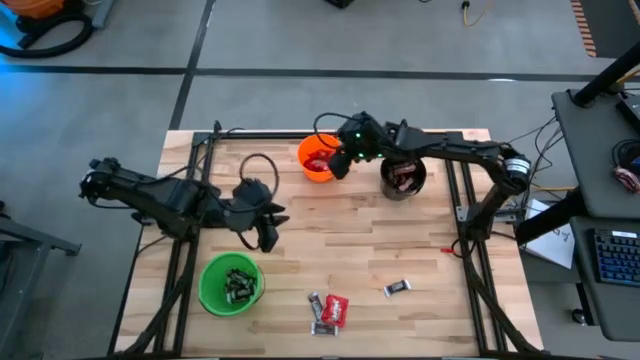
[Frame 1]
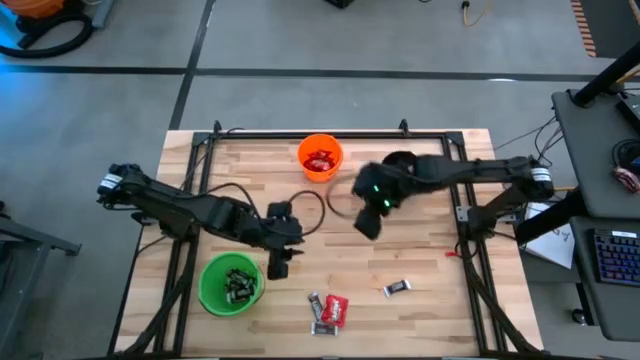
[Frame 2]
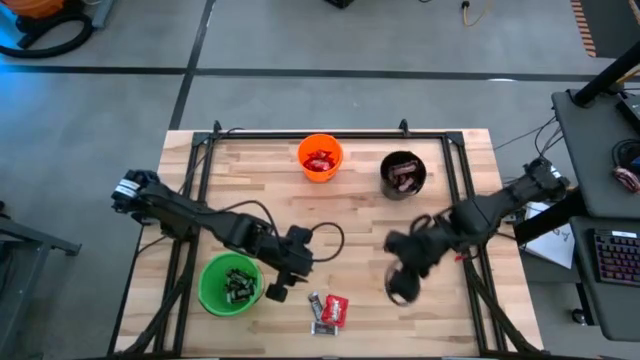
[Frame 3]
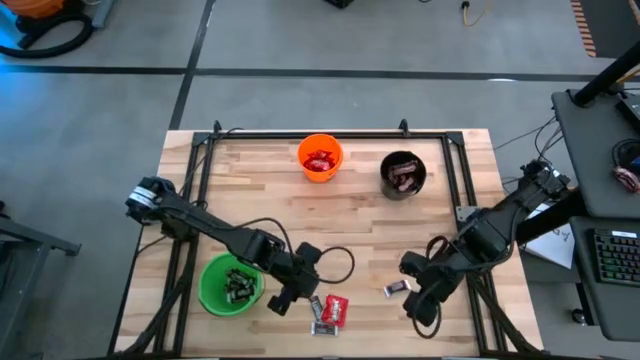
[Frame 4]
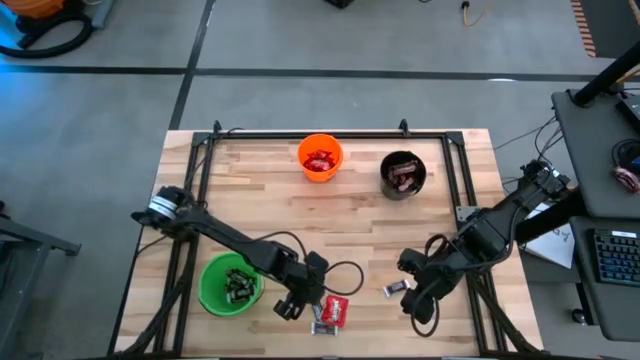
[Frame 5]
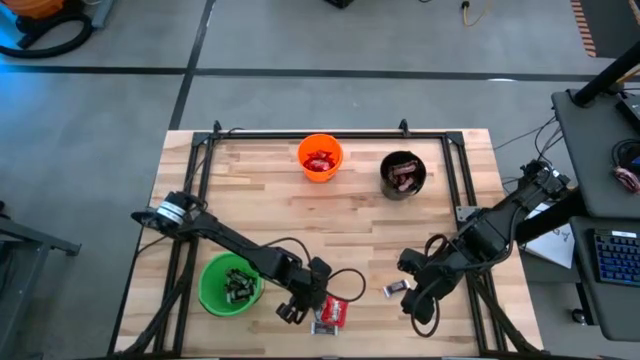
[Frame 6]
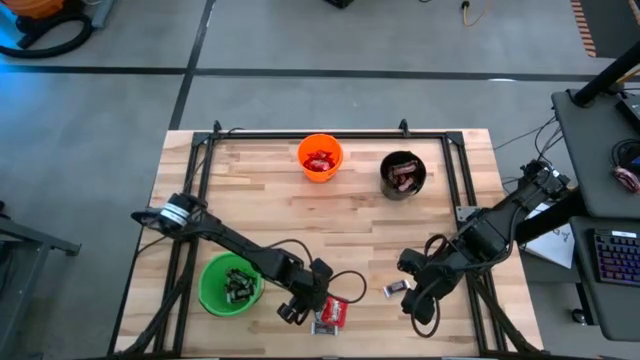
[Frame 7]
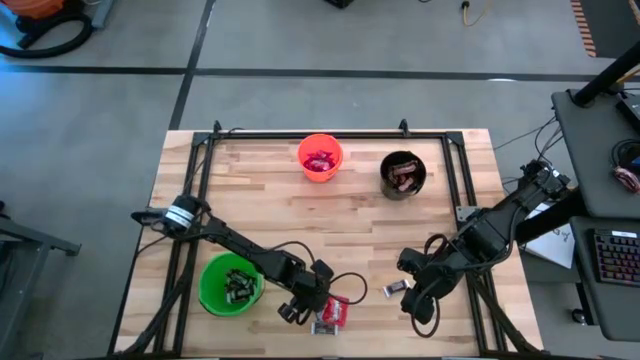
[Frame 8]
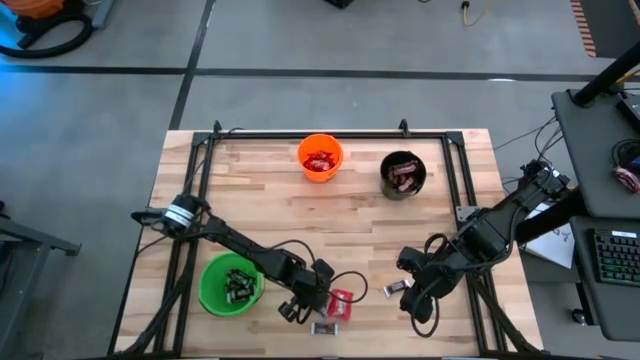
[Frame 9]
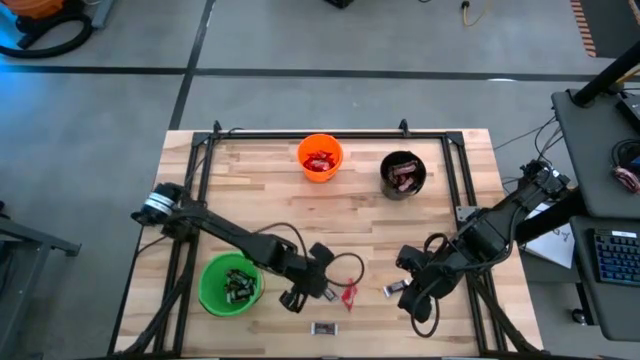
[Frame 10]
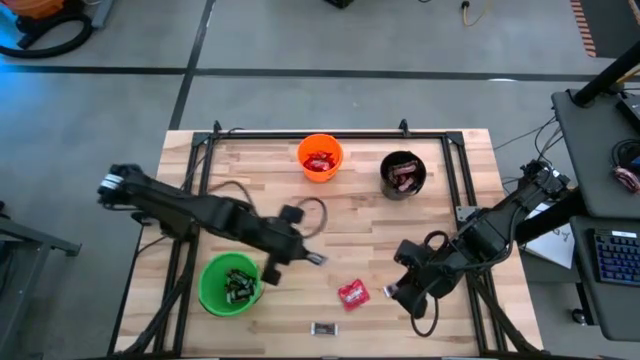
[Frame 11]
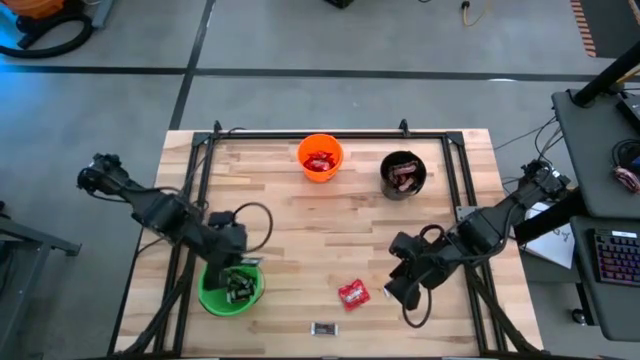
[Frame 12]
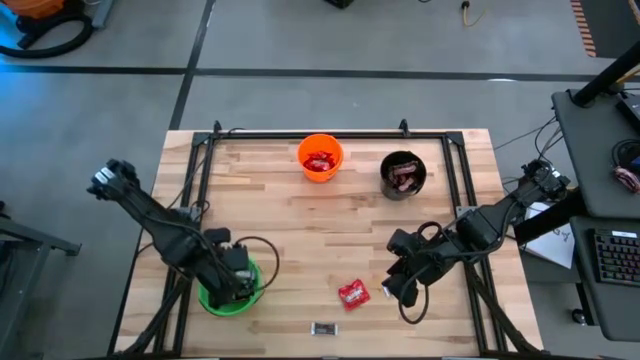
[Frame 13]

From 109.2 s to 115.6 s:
Task: Sort candy
Put the black chocolate into the green bucket

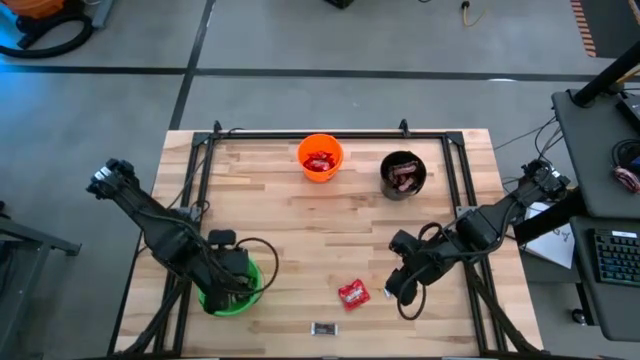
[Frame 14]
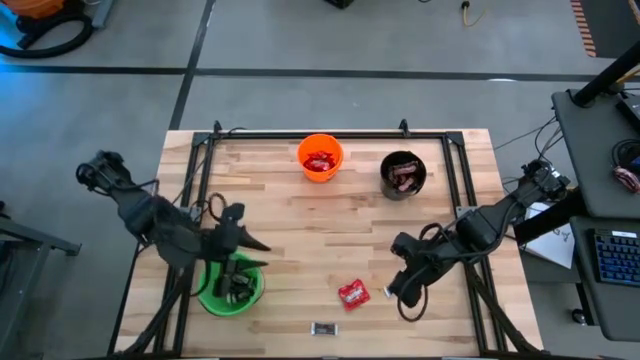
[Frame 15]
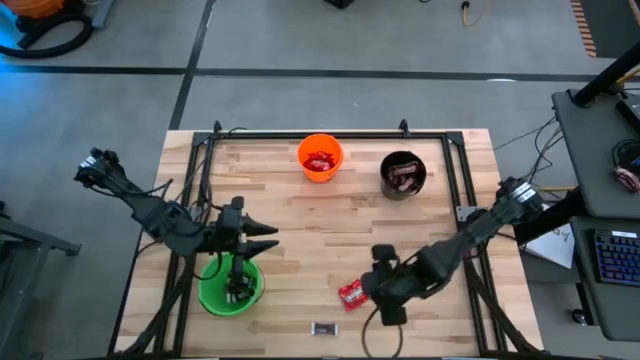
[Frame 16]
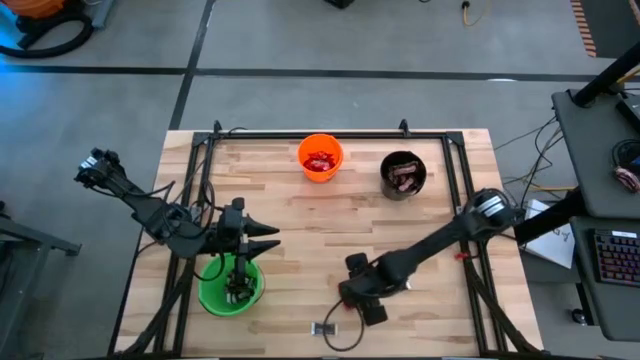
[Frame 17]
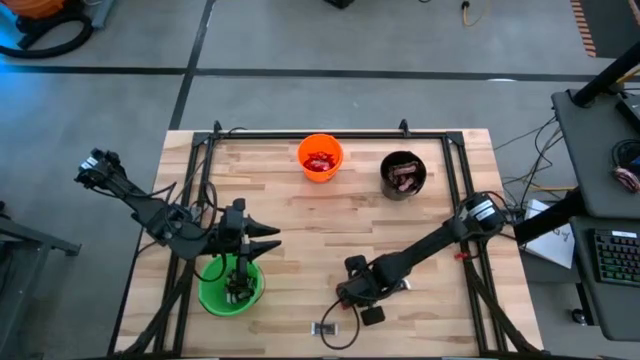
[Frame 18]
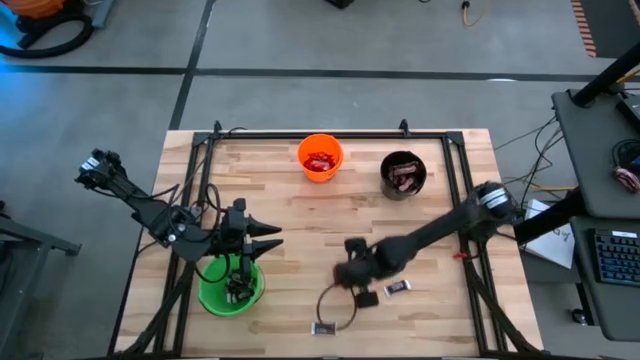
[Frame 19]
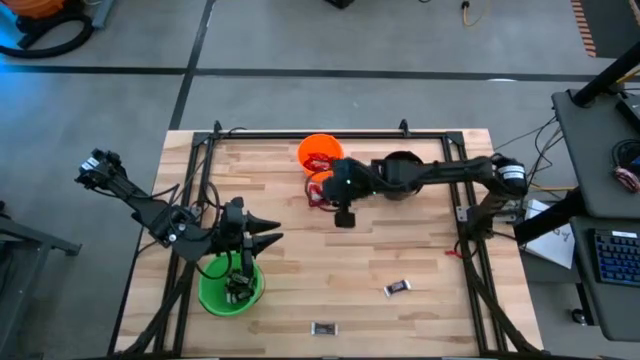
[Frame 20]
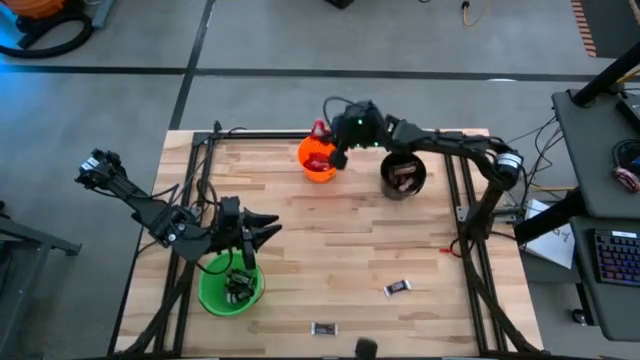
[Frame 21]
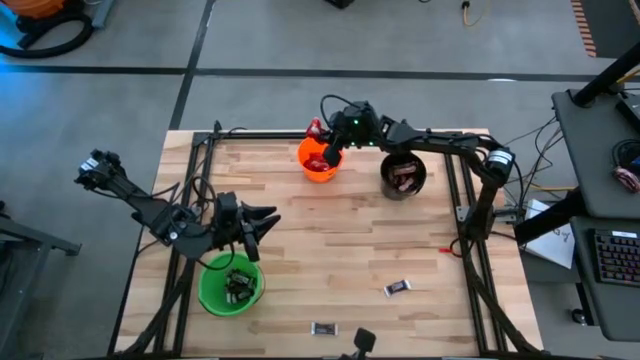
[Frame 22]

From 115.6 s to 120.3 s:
Put the red candy into the orange bucket

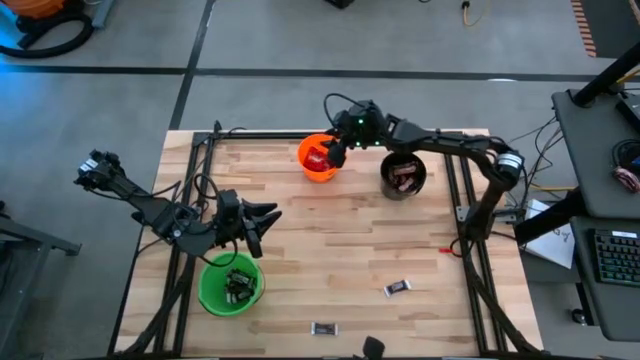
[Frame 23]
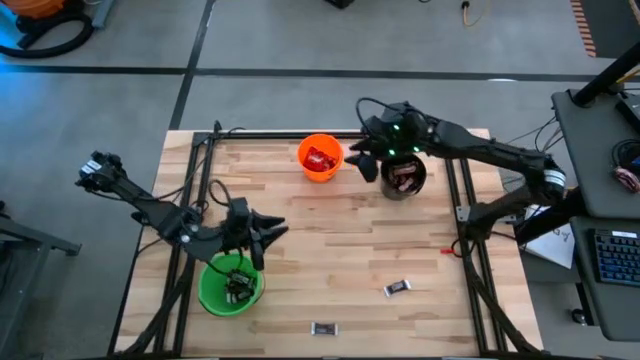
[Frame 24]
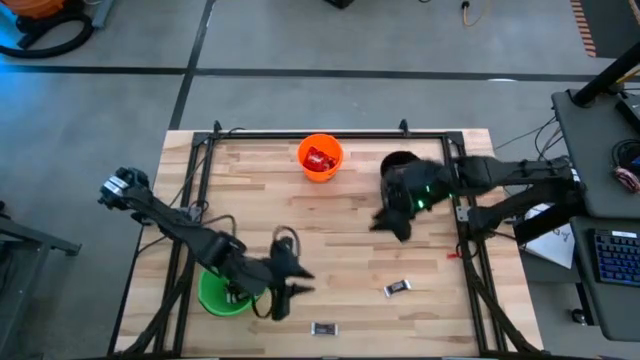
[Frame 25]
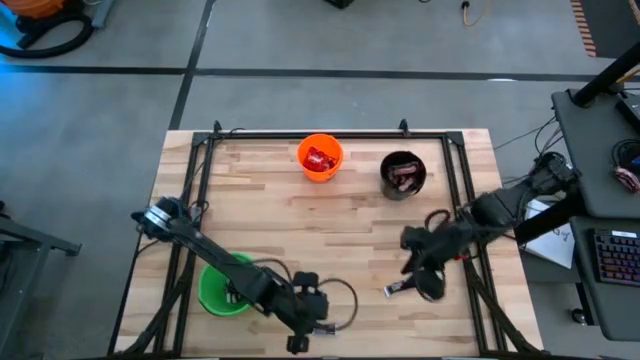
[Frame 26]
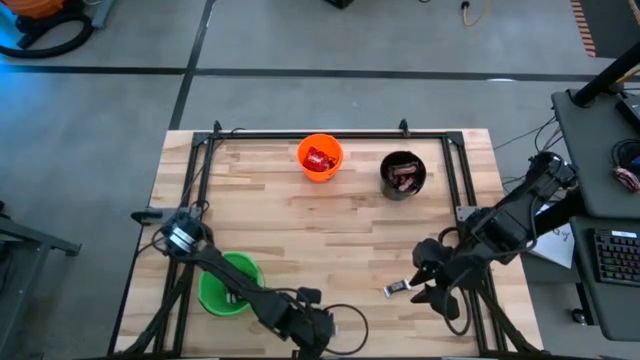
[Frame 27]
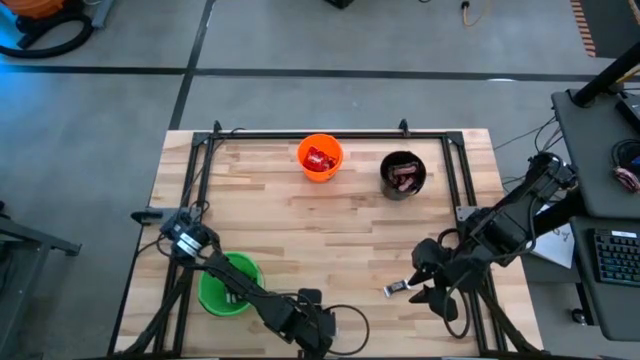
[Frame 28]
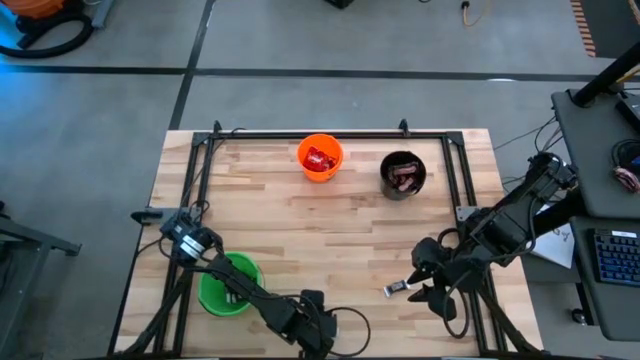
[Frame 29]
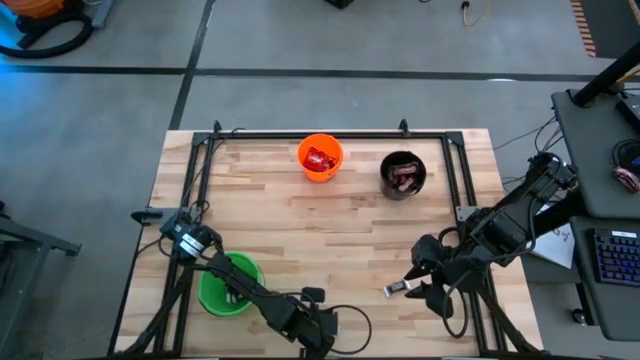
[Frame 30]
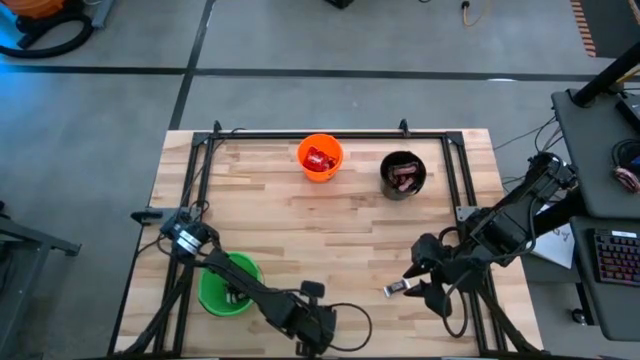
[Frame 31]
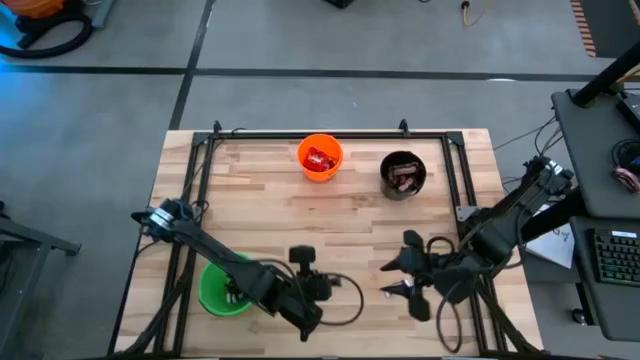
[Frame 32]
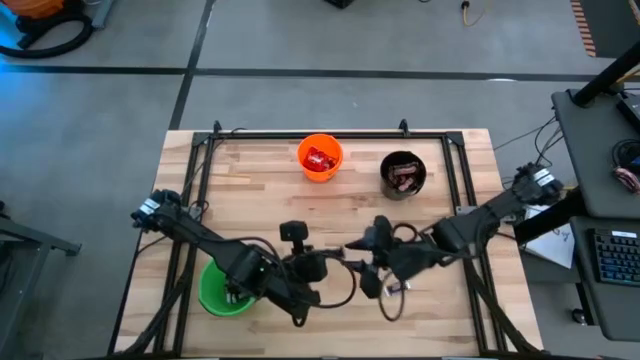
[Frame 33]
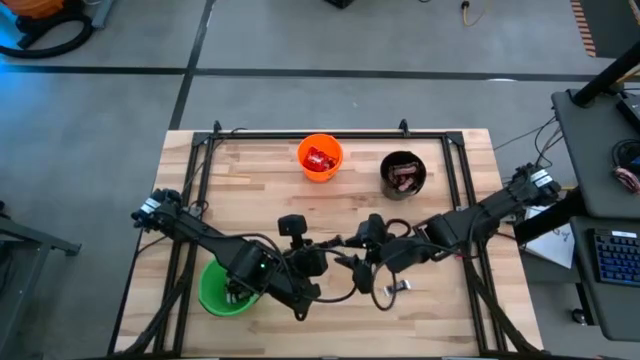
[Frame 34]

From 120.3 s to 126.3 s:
Put the black chocolate into the green bucket

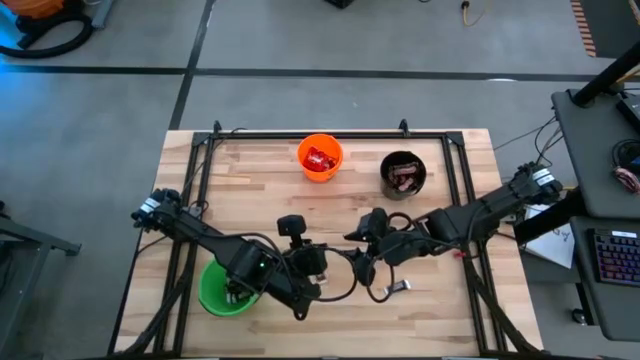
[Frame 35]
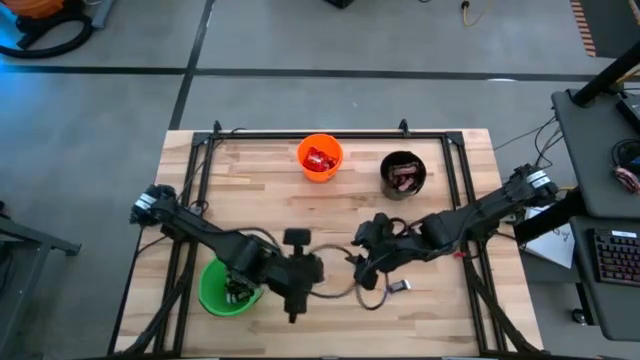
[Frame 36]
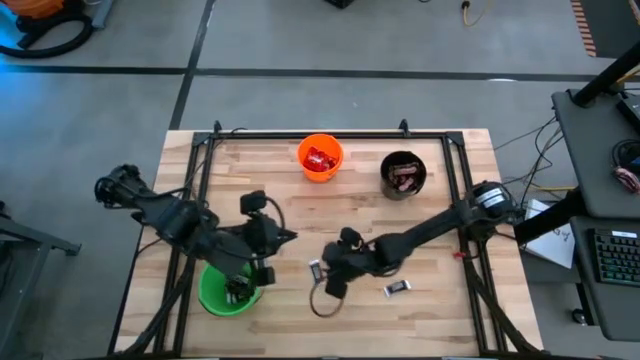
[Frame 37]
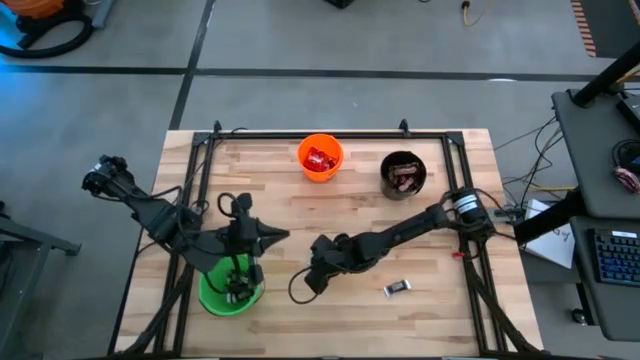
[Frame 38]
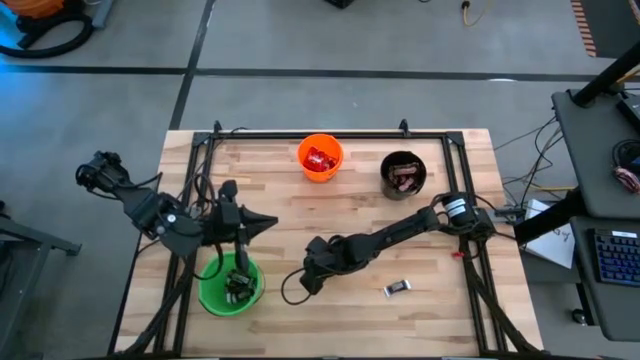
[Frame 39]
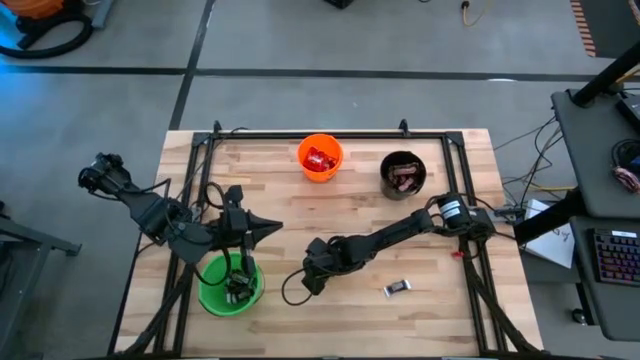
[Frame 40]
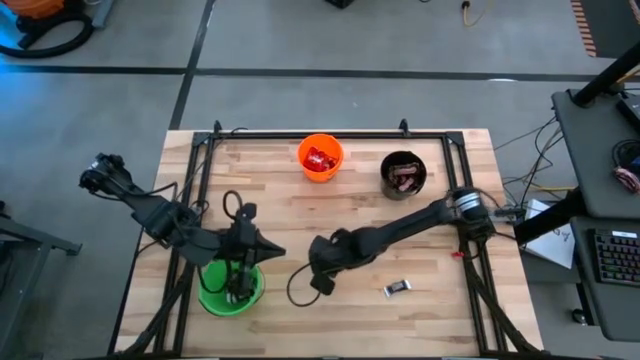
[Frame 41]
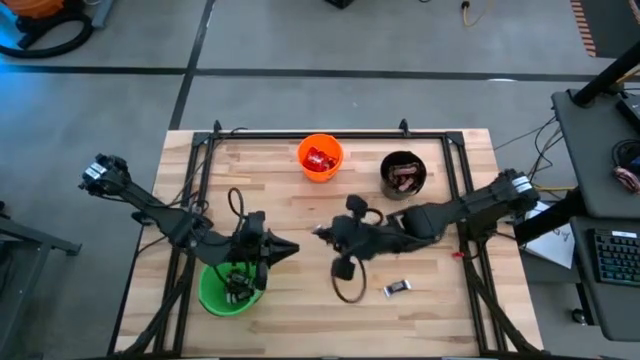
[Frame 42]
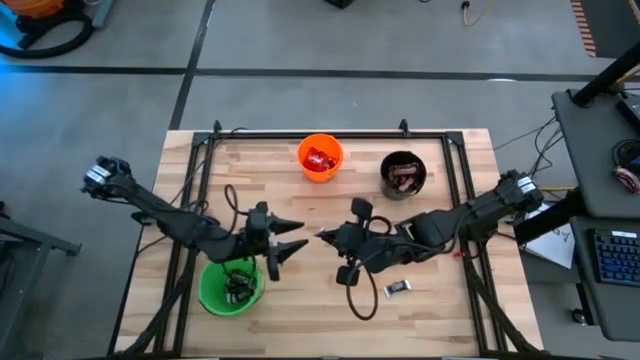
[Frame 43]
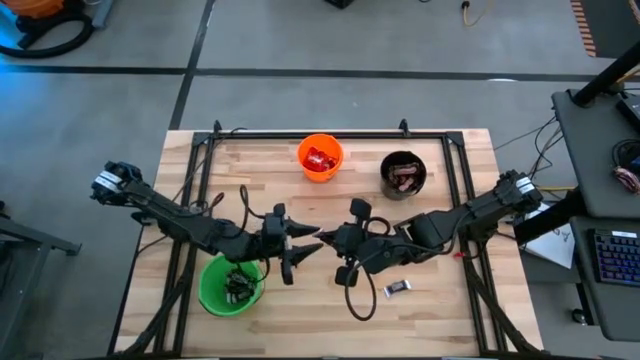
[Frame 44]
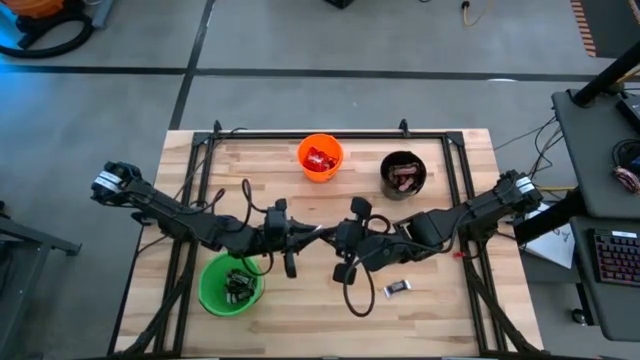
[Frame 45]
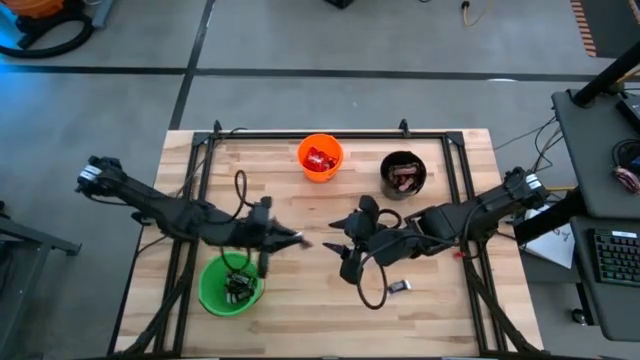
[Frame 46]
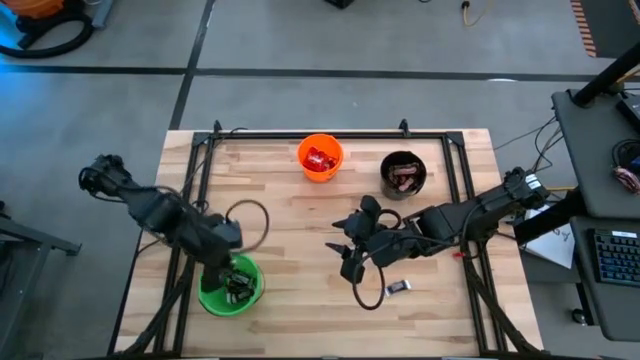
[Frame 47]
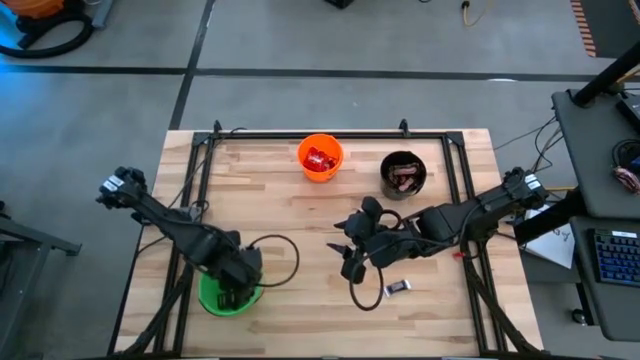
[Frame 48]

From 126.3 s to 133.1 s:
Put the black chocolate into the green bucket
